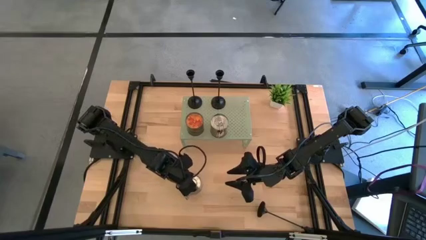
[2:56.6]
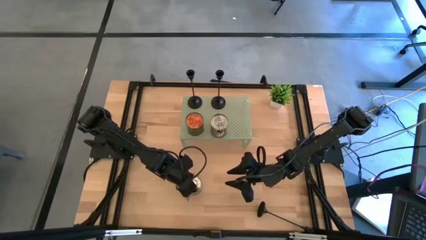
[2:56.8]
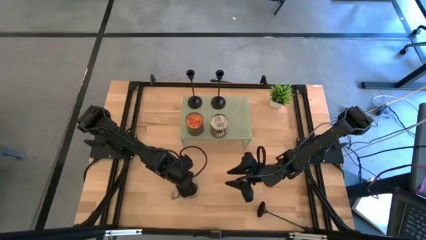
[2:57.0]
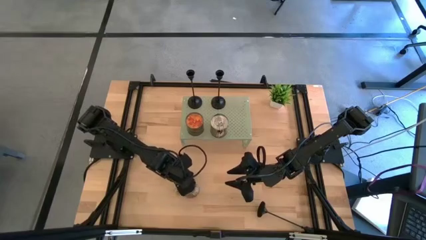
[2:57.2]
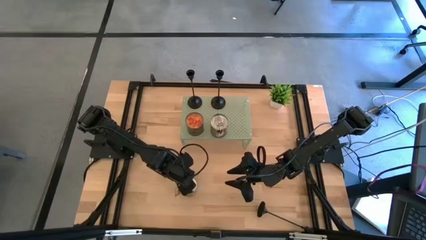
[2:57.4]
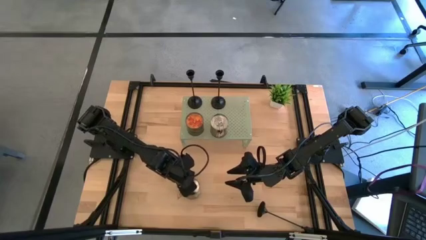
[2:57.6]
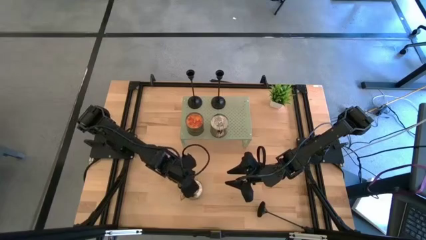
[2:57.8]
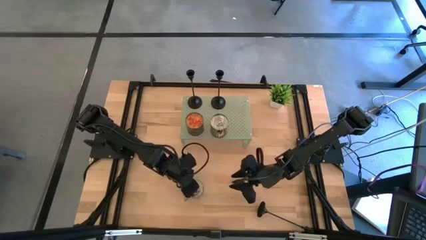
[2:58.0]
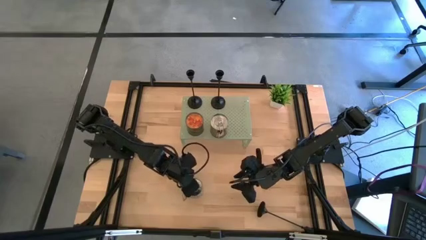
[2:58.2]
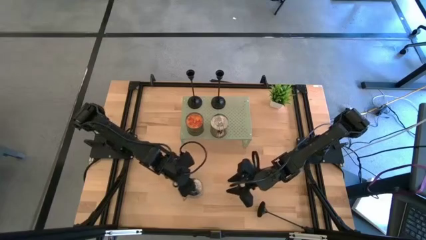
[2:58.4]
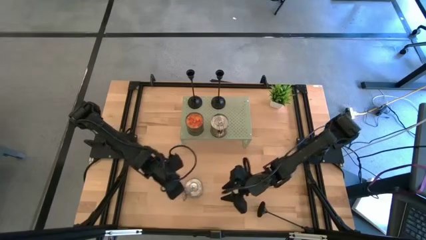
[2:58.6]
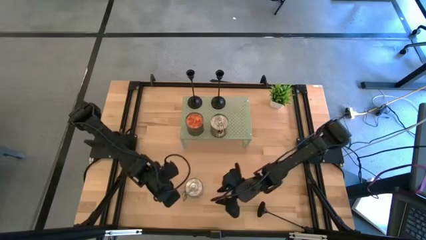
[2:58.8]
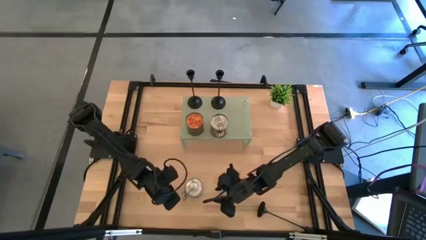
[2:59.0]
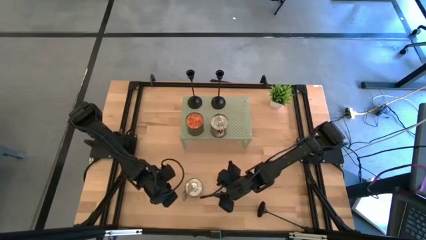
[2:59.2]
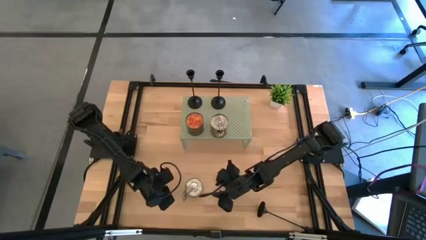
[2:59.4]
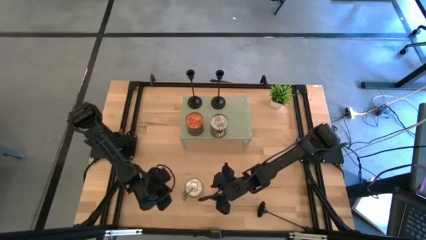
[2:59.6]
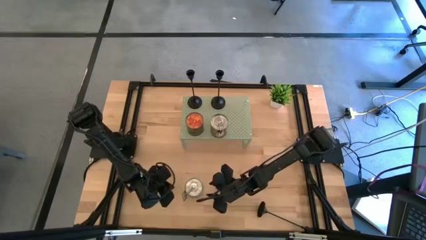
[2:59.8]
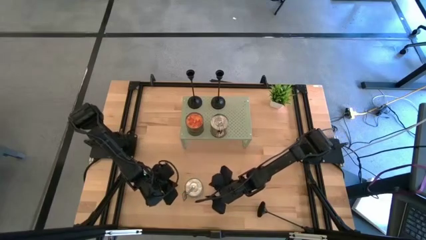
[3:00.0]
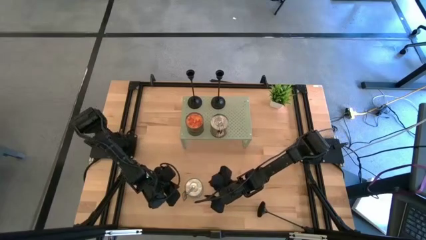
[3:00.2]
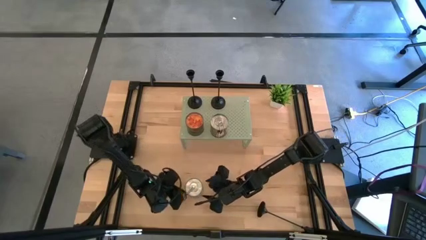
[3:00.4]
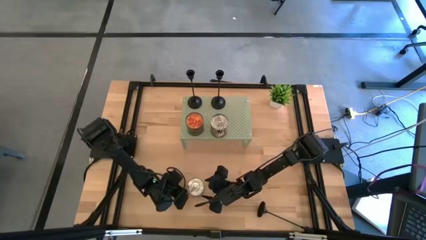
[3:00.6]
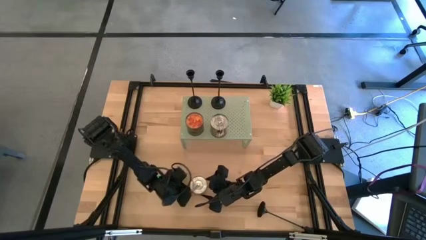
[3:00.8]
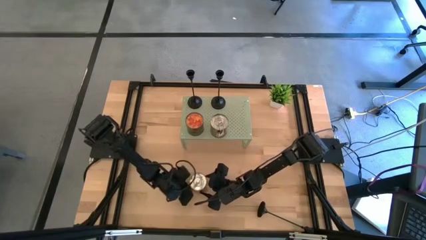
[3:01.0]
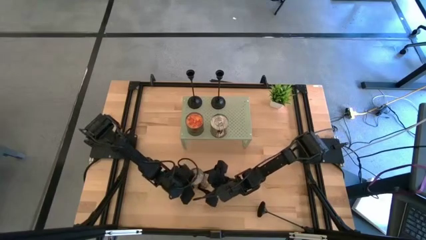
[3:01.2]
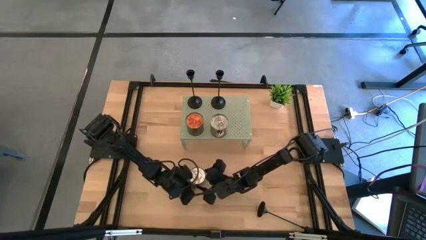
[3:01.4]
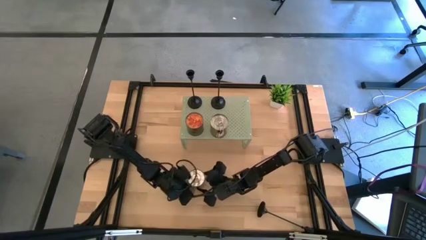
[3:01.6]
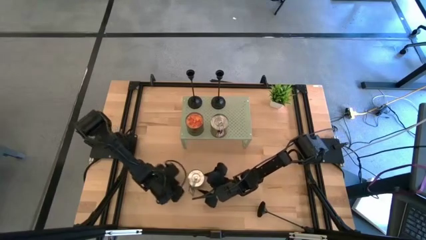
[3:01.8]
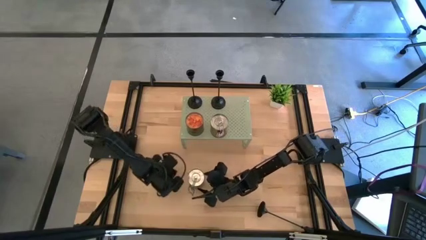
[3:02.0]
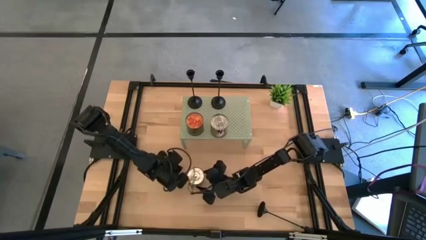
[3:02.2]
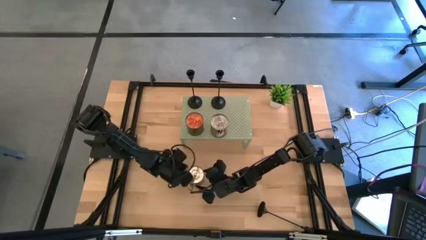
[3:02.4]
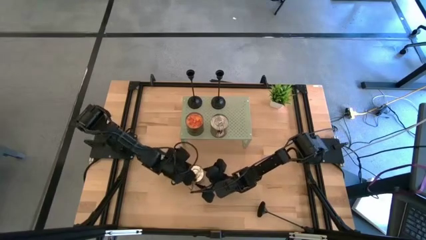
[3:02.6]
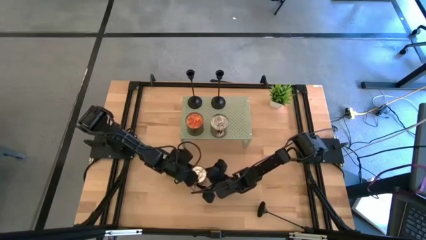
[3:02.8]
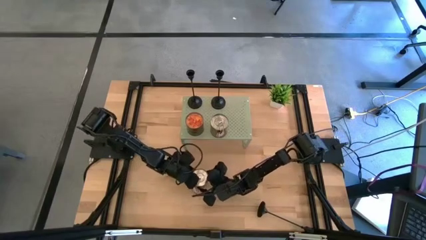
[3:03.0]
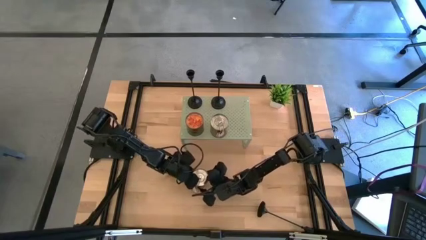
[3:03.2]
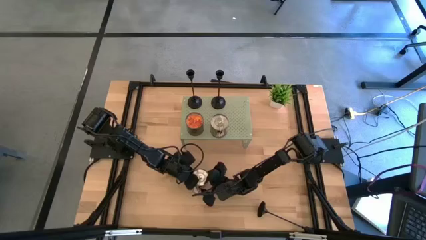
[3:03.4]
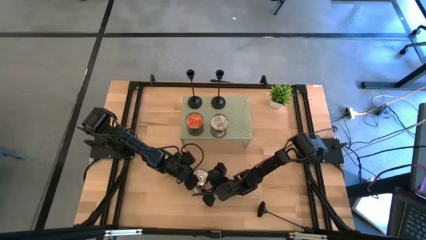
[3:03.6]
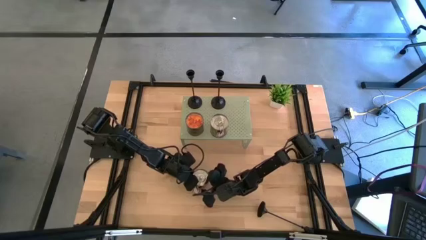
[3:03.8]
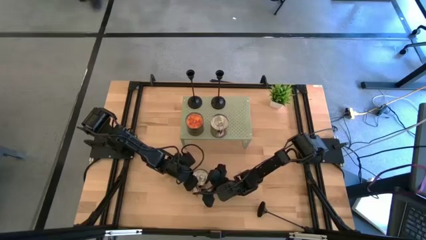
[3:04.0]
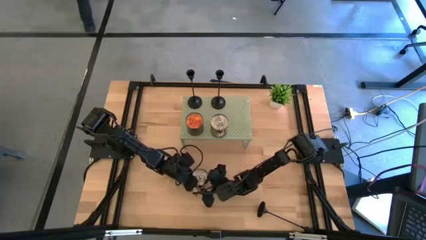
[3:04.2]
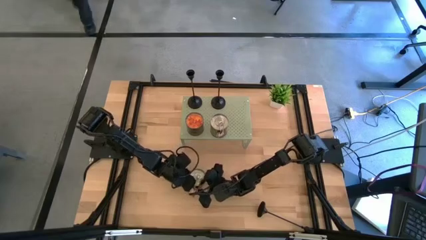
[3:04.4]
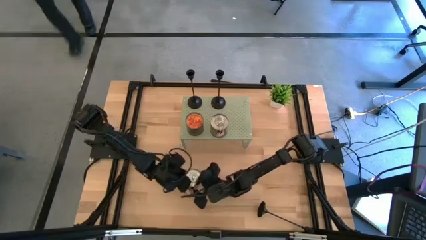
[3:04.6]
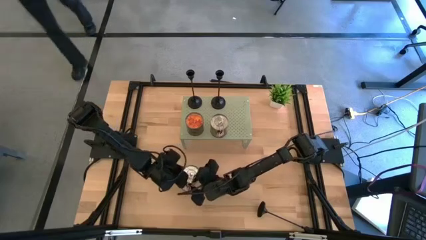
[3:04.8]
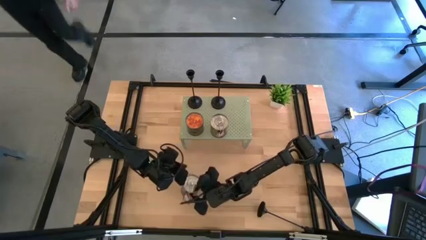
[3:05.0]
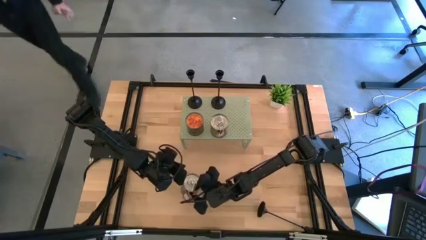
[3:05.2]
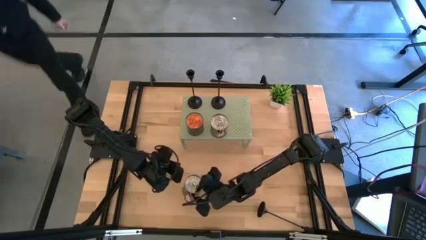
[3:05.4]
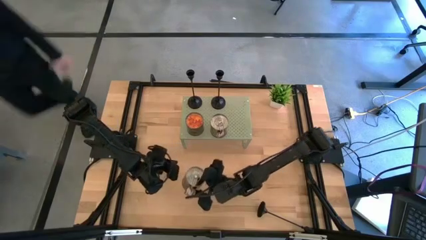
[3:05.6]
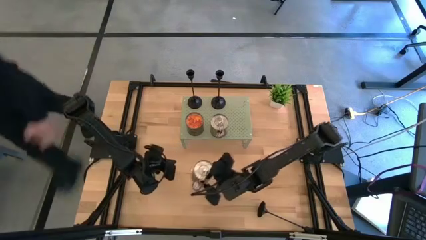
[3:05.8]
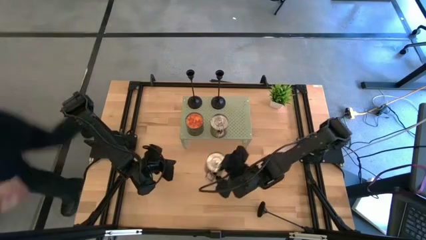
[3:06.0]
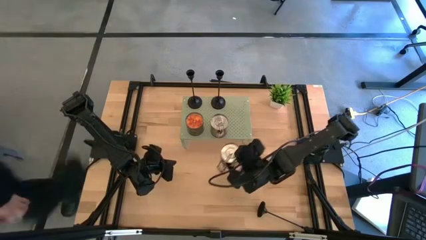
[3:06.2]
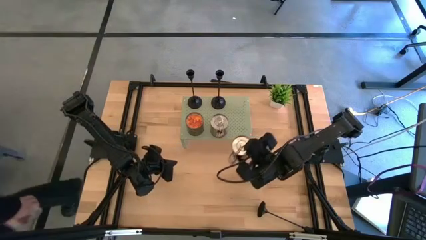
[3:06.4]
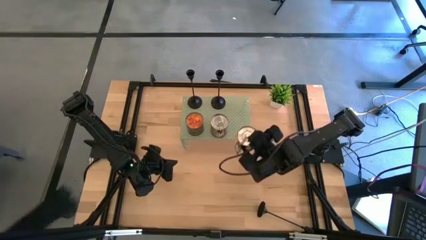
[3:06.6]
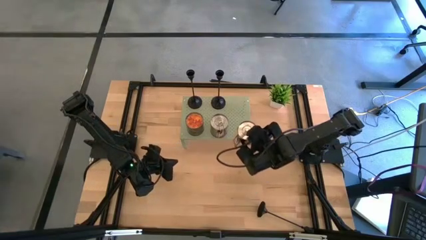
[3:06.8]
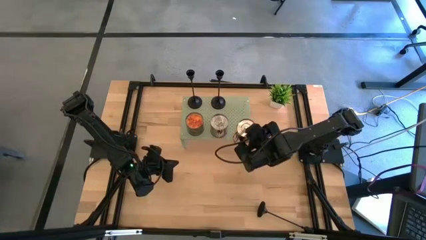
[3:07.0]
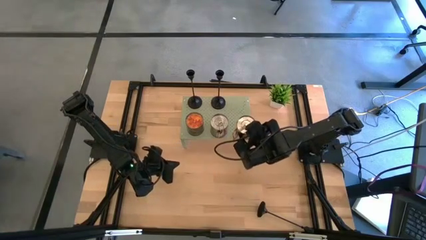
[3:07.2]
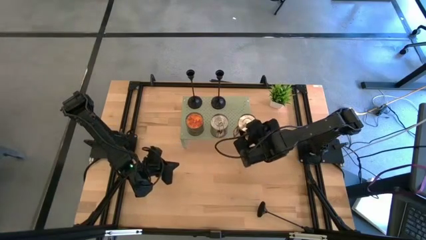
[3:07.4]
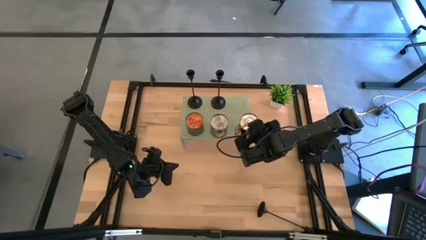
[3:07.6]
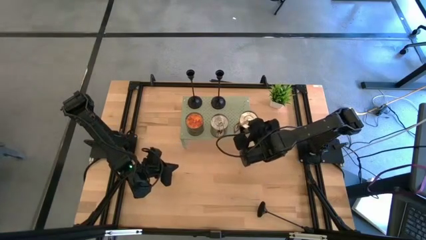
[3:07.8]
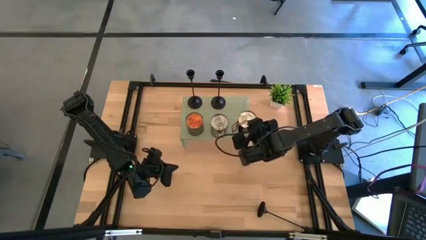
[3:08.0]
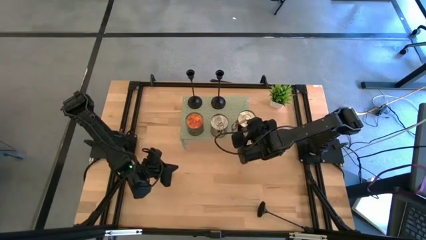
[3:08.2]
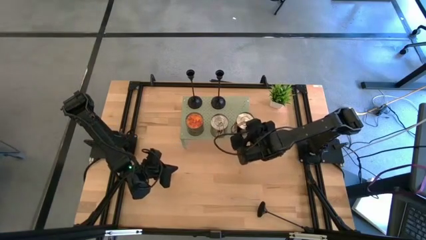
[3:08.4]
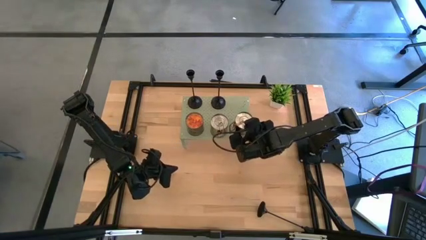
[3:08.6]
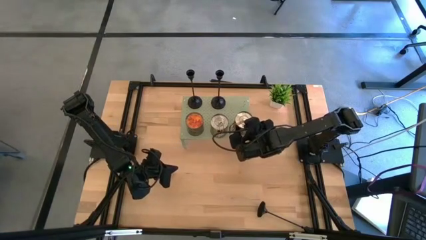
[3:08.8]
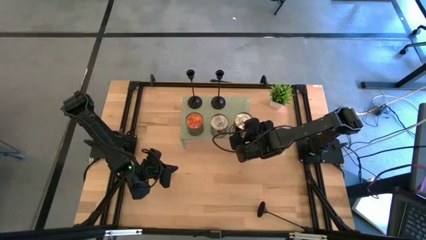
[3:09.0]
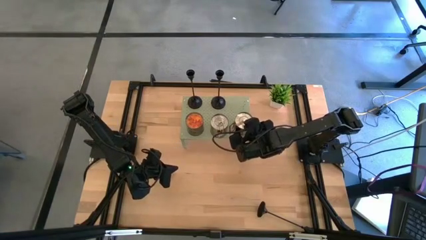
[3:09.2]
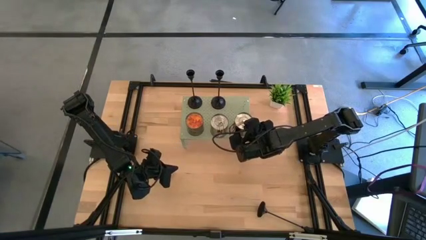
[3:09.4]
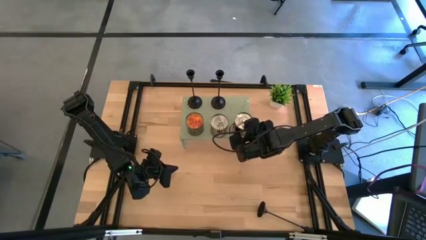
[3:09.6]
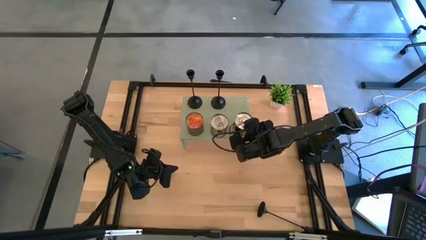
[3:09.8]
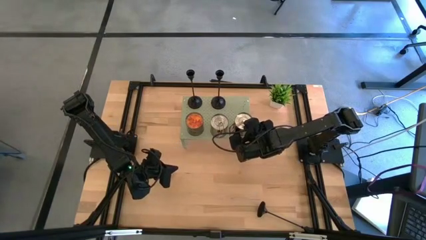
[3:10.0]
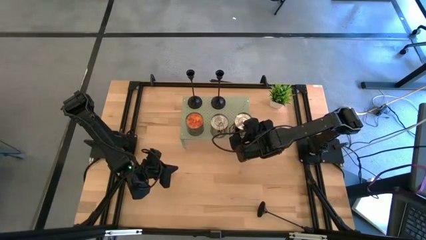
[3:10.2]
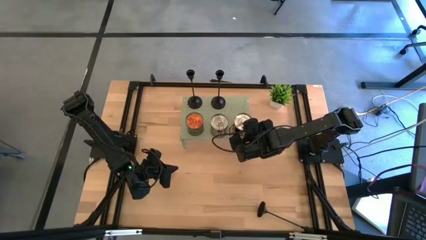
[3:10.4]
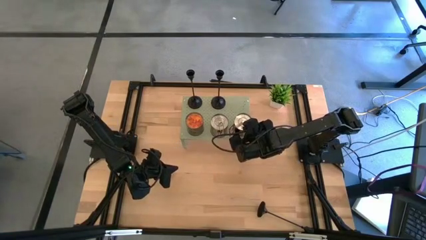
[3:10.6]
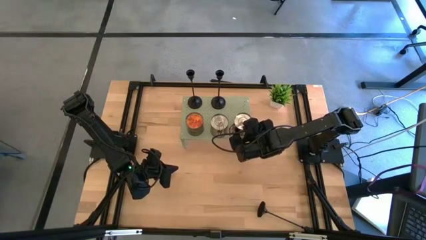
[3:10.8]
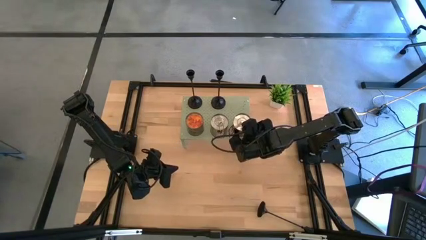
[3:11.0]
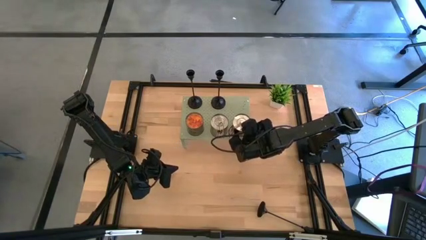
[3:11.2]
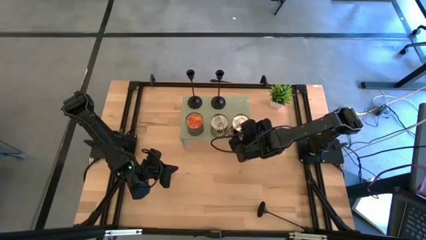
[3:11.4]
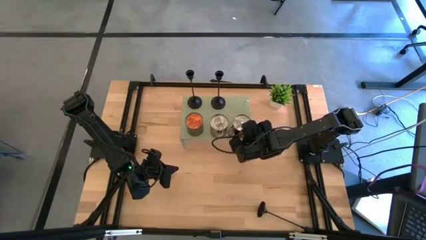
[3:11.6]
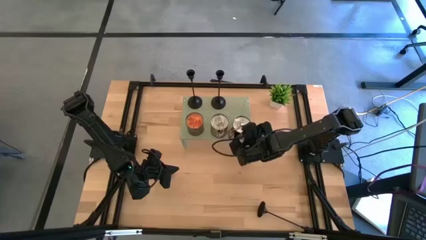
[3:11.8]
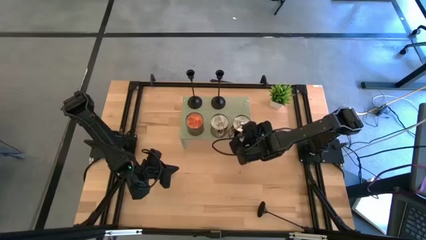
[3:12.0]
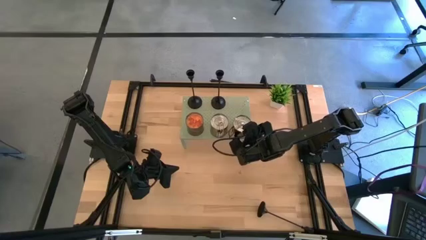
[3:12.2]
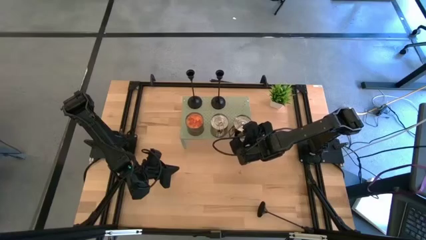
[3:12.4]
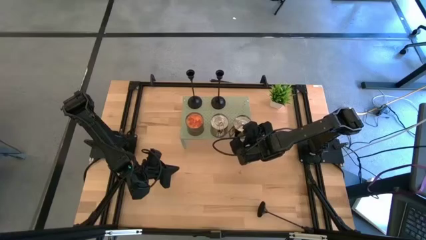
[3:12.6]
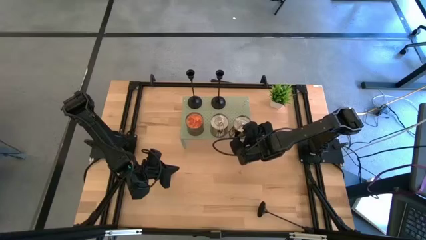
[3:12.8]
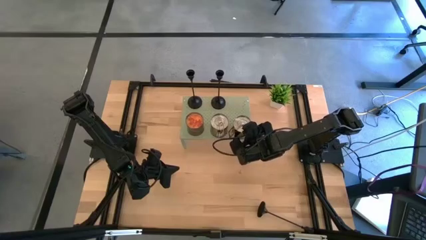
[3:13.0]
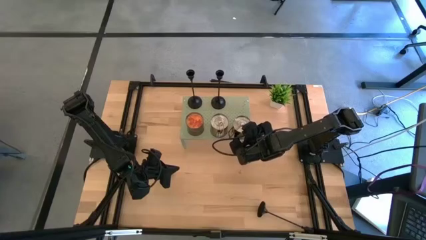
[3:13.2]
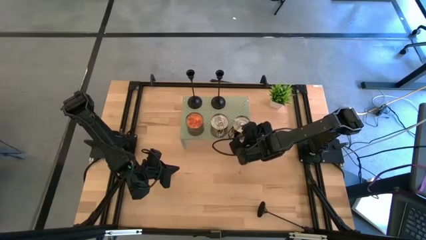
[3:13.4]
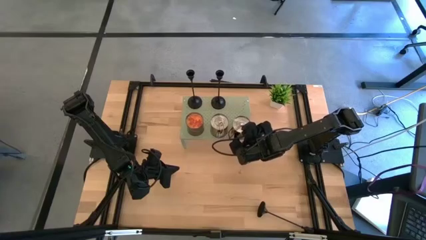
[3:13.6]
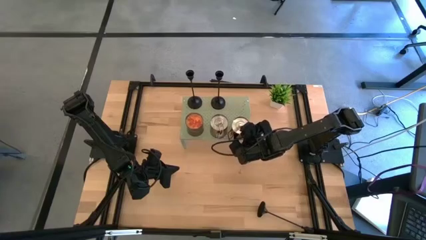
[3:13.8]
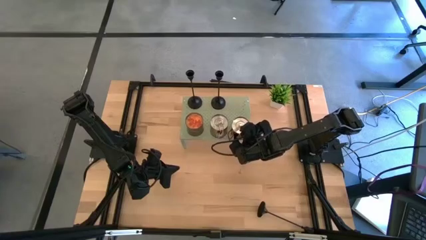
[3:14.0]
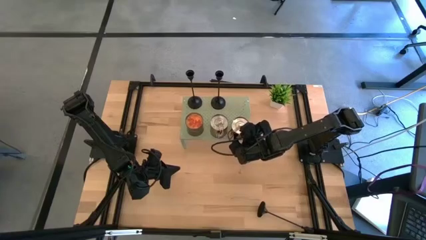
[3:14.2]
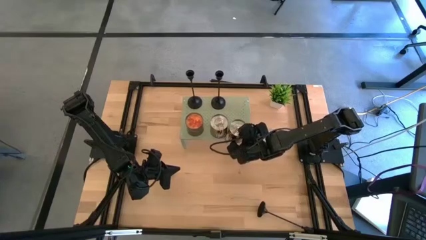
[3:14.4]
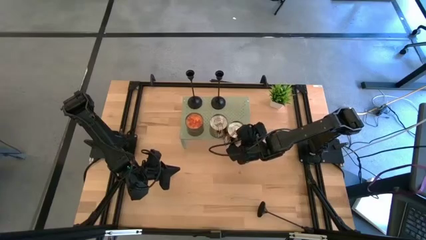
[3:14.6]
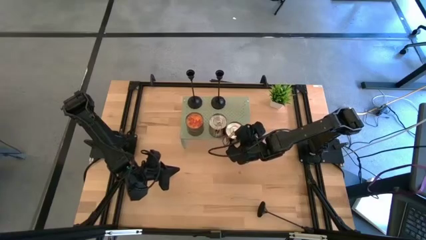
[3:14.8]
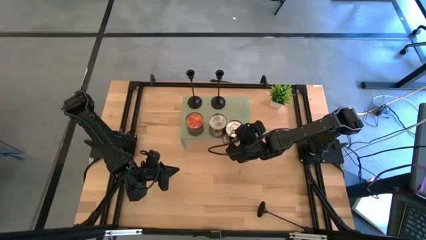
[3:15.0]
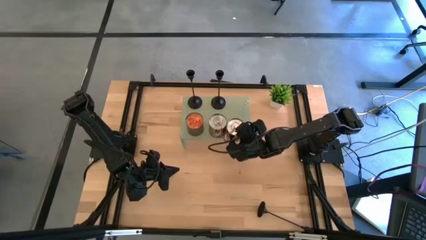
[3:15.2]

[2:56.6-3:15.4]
Task: Pick & Place candle stick holders
Put the brown scented candle on the shelf aligned with the other brown scented candle
